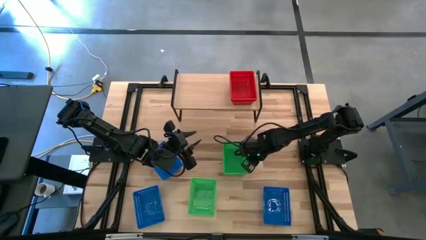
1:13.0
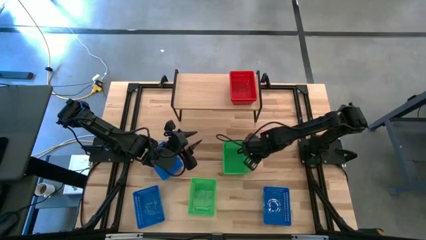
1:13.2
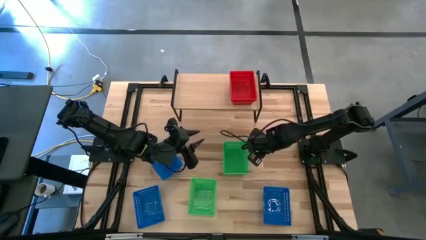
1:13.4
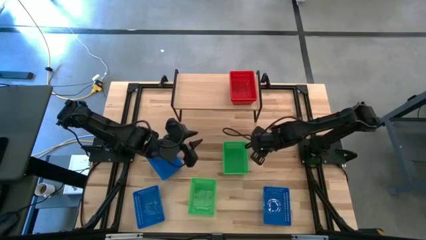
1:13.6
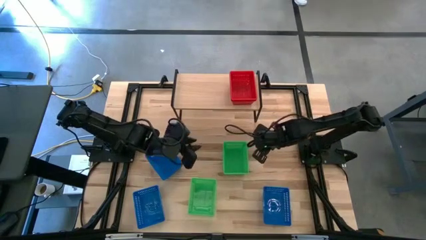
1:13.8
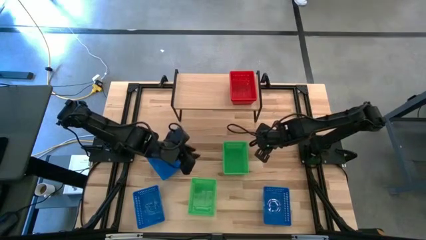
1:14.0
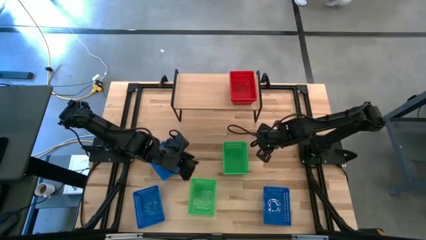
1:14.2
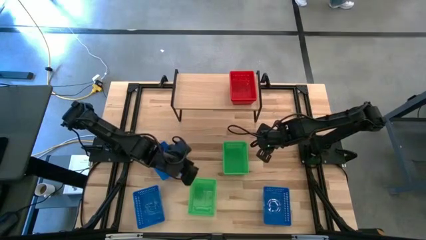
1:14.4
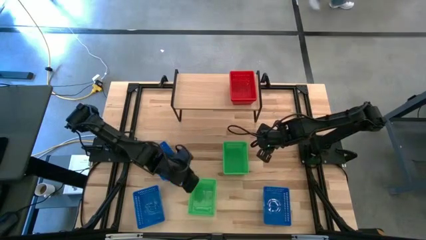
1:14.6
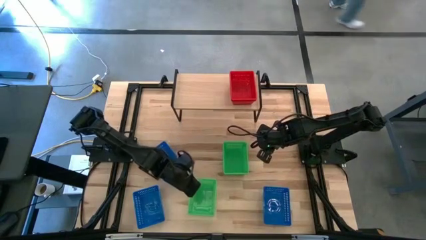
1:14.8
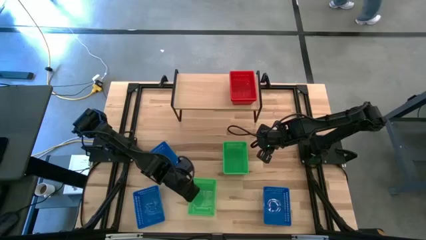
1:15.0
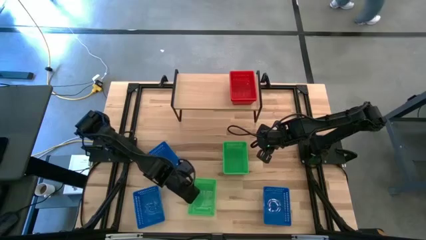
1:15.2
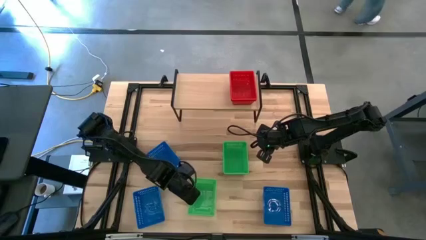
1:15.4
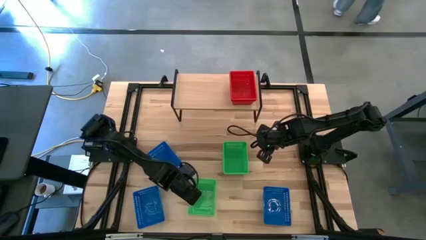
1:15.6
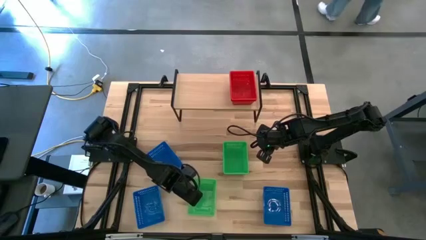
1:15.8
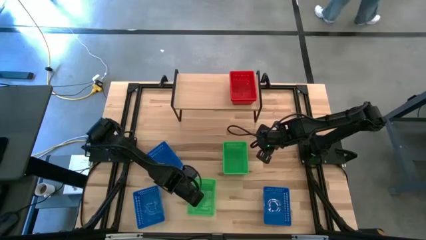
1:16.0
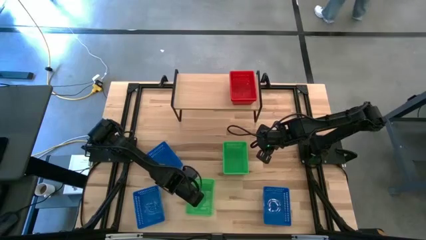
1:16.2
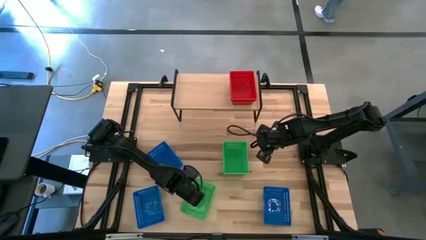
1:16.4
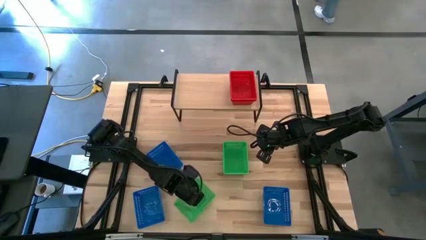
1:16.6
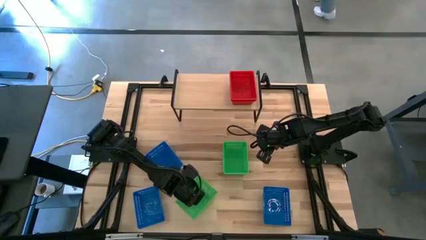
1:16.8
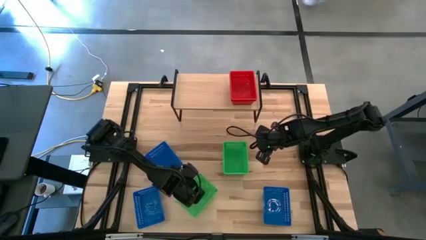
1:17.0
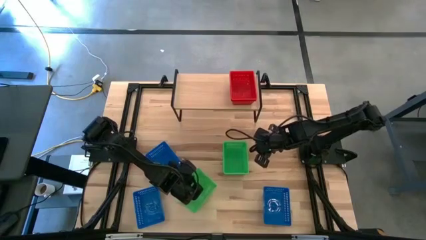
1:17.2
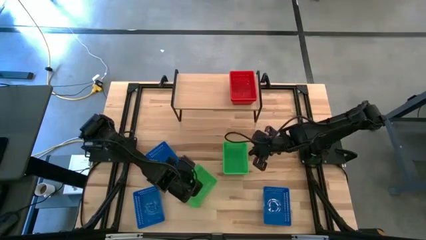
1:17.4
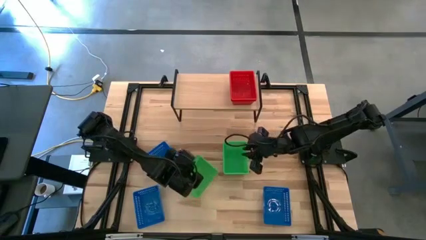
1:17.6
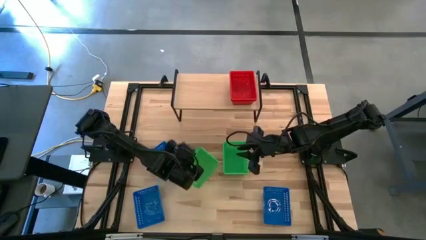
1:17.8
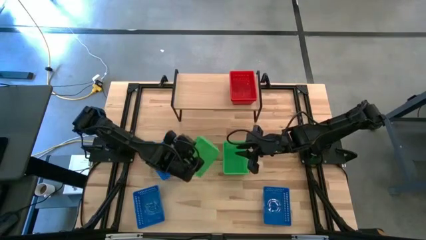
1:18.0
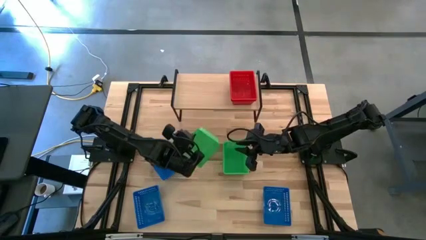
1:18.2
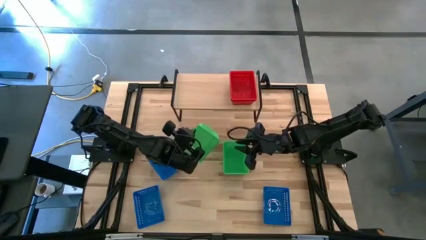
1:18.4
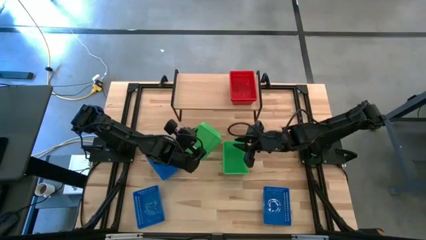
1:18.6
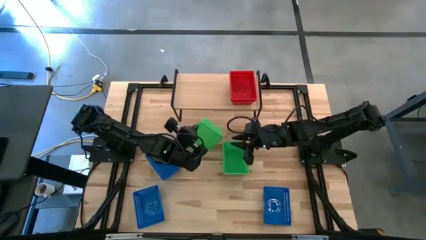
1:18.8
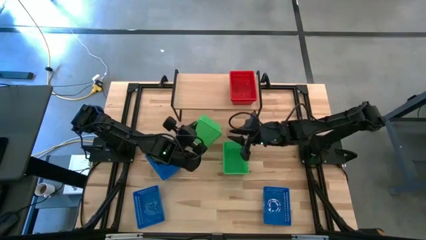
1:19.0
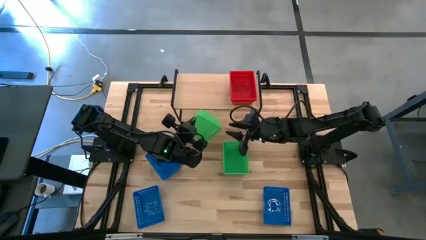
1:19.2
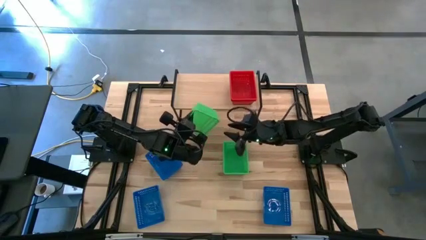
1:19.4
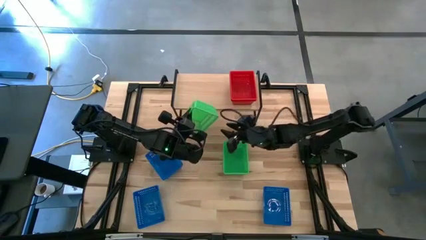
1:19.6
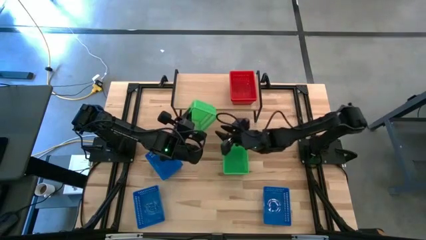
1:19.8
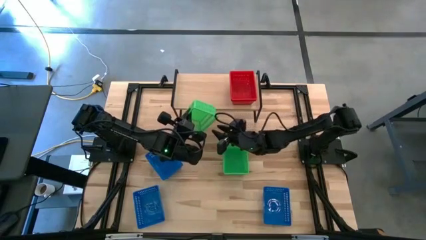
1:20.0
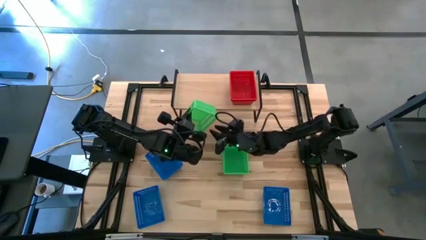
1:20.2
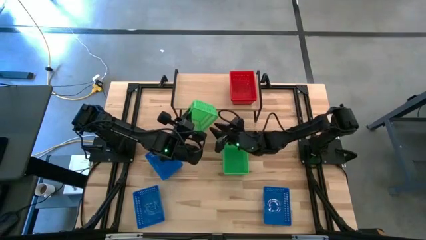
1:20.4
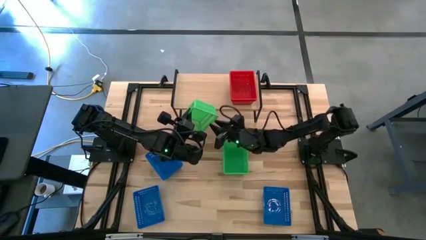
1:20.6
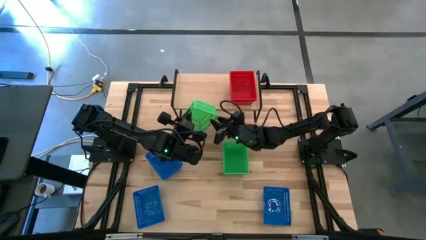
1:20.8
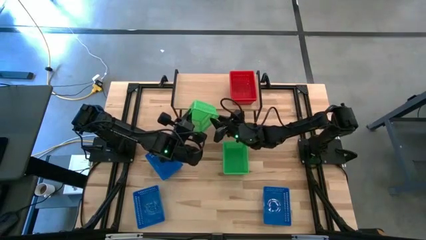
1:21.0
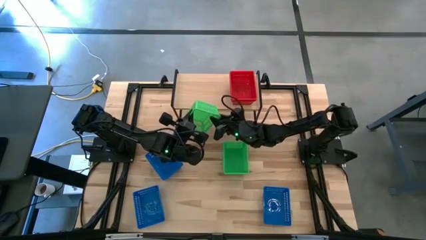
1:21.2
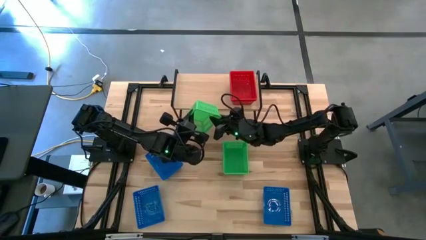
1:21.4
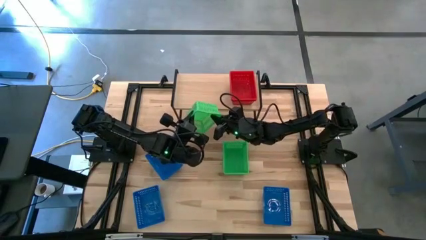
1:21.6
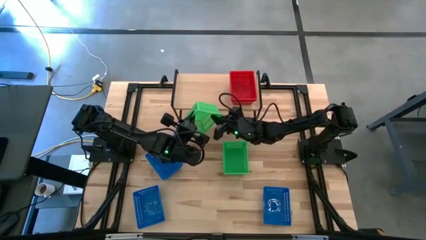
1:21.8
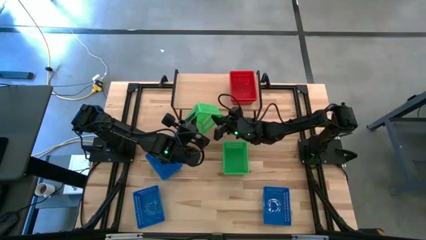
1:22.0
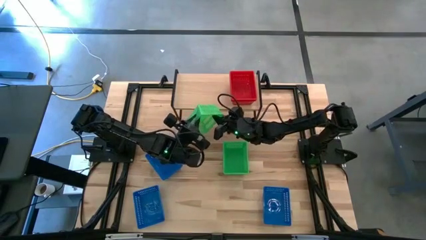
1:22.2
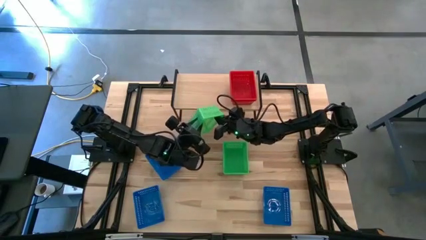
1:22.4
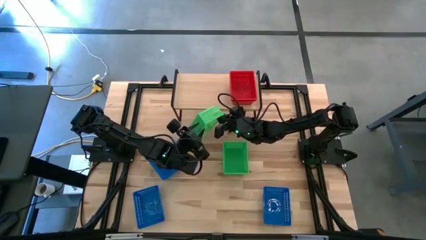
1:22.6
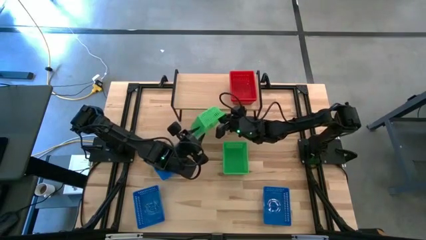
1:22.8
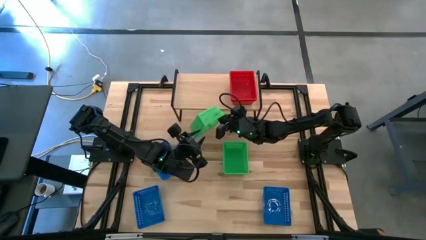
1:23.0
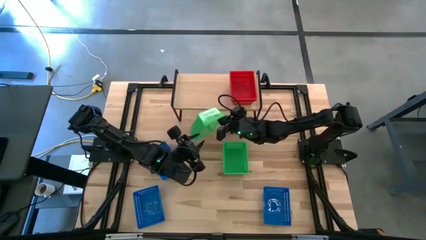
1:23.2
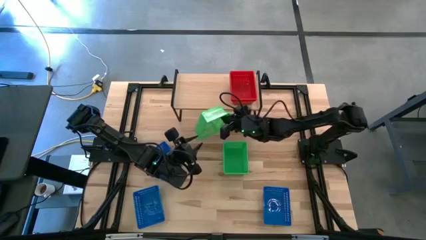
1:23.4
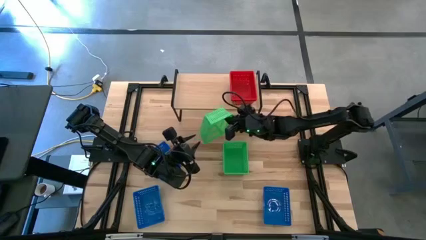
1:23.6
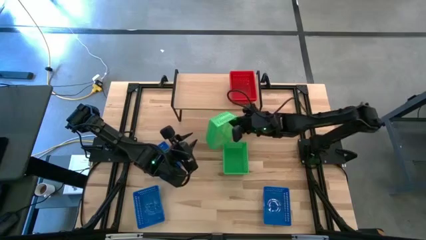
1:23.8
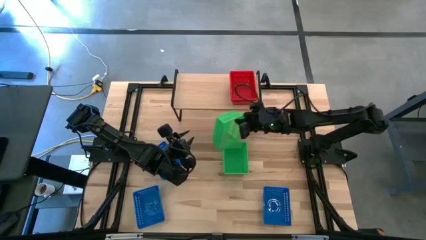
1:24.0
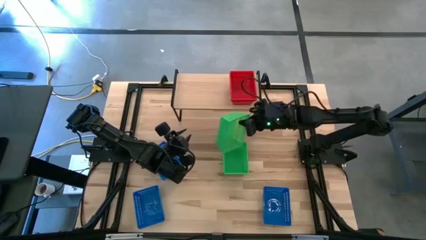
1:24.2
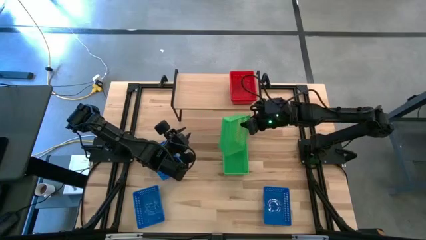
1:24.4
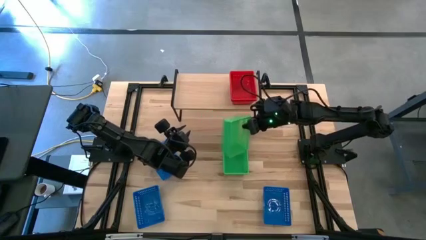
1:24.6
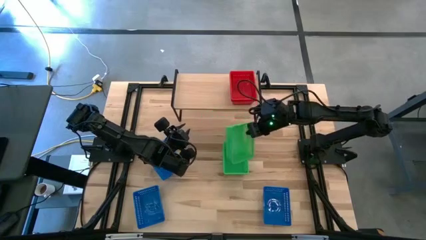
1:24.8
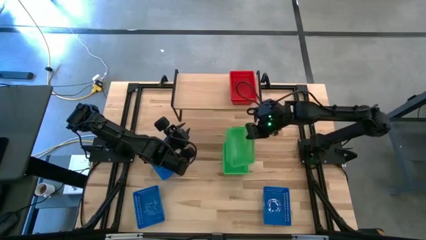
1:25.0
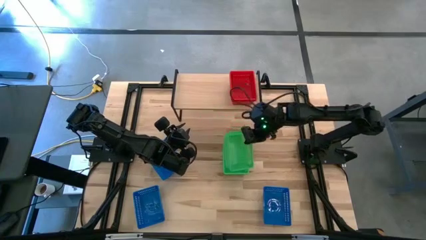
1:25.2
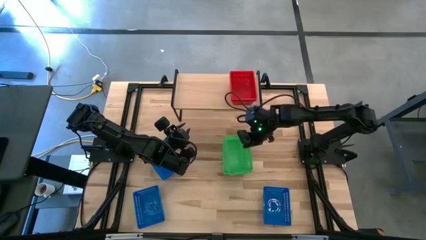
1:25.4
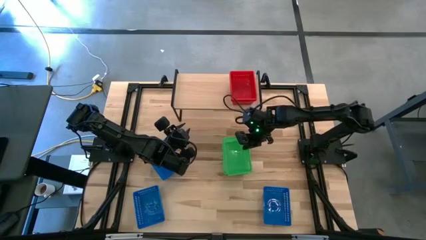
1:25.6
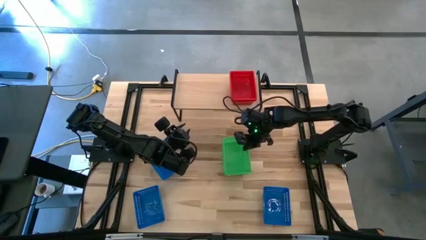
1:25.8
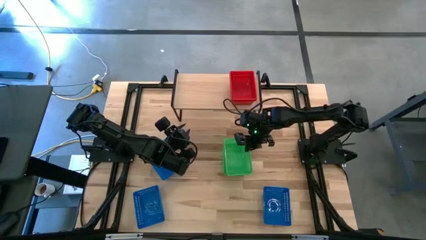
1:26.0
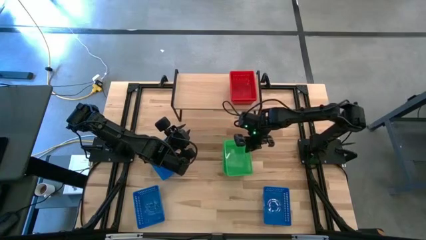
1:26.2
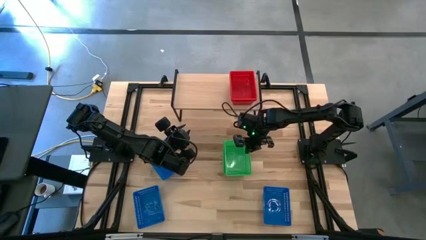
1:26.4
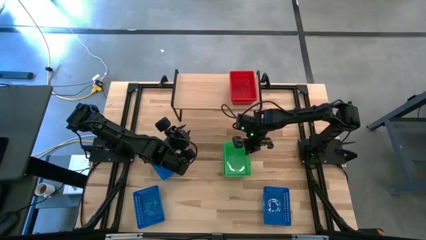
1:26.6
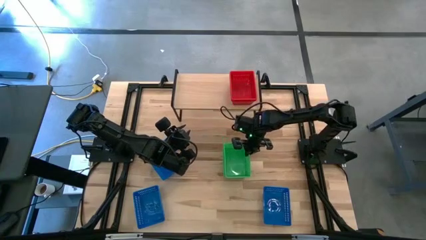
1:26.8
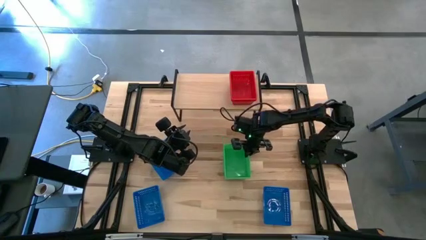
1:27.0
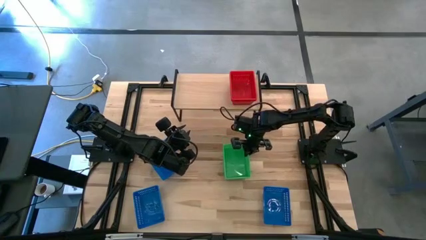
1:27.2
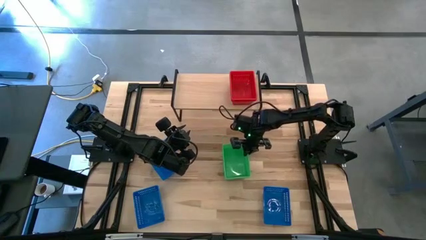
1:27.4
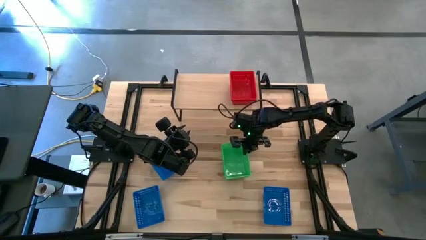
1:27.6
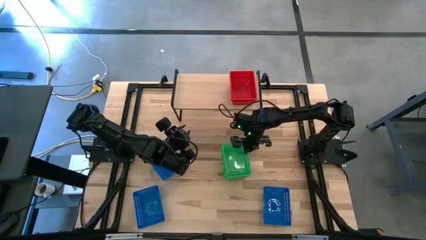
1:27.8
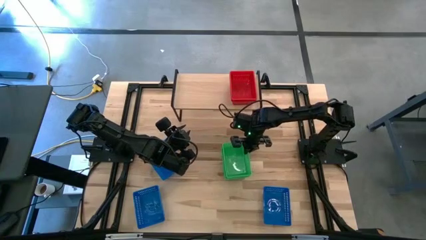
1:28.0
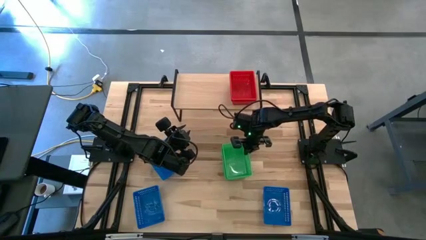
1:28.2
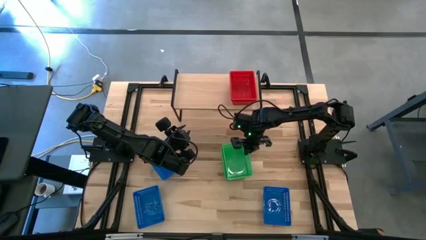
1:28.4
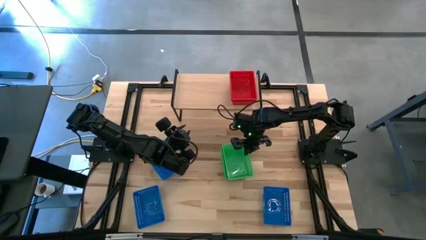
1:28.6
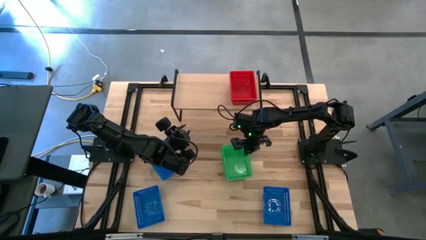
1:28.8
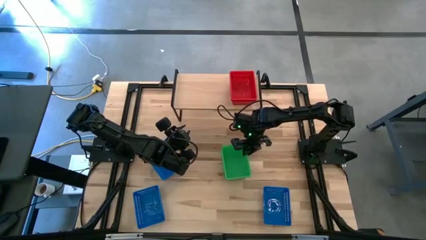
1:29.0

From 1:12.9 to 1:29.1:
Task: Stack baskets on shelf by color
Stack the bottom green basket on the top of the stacked green baskets
